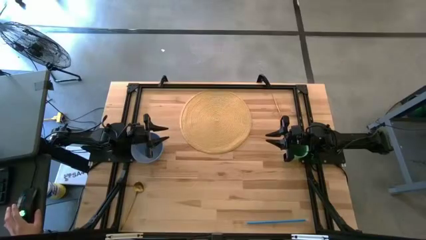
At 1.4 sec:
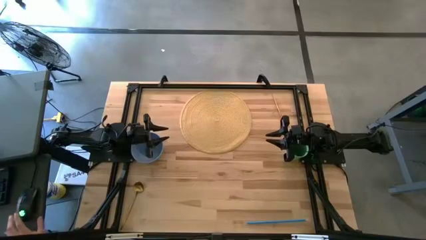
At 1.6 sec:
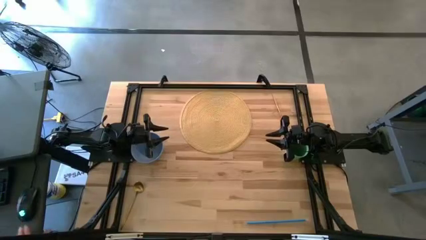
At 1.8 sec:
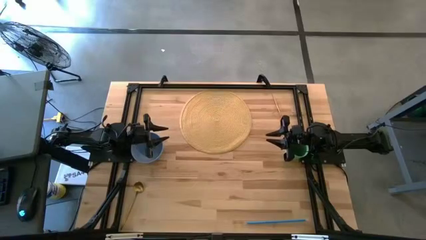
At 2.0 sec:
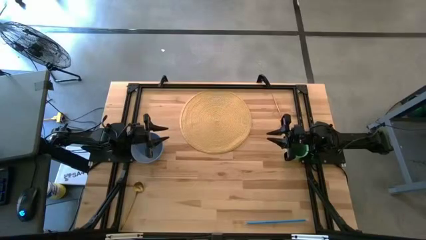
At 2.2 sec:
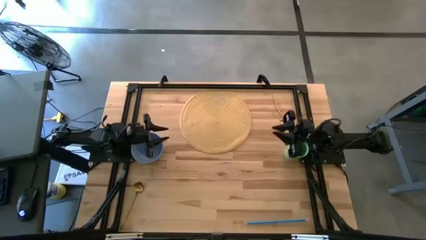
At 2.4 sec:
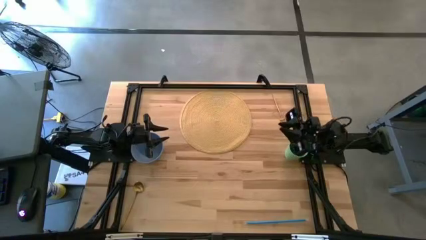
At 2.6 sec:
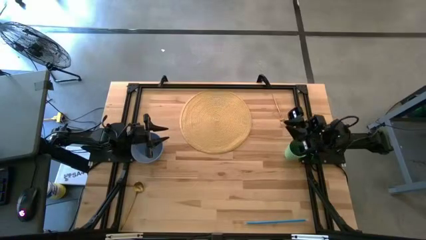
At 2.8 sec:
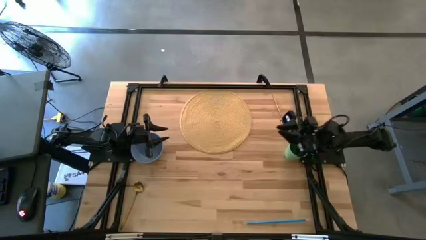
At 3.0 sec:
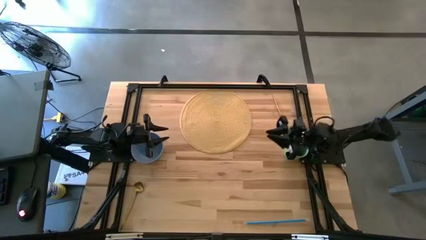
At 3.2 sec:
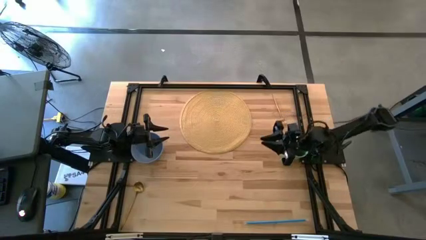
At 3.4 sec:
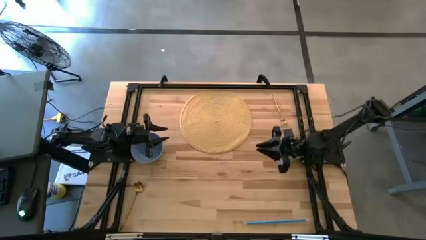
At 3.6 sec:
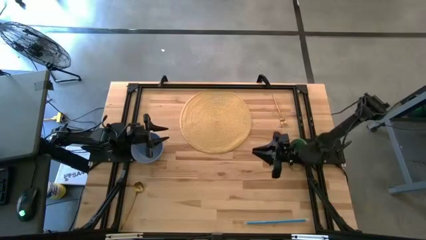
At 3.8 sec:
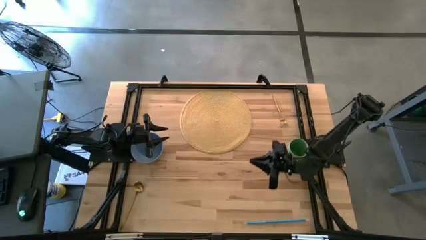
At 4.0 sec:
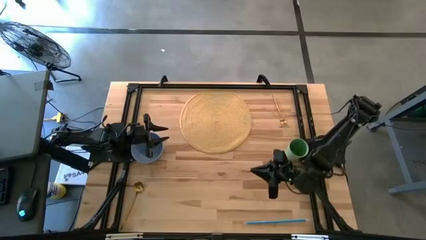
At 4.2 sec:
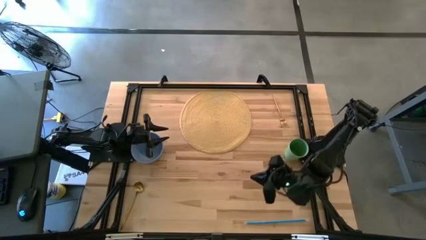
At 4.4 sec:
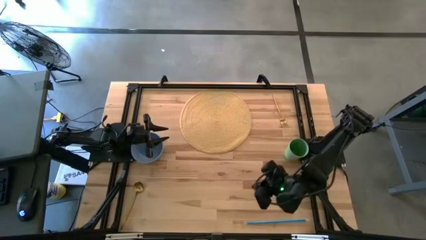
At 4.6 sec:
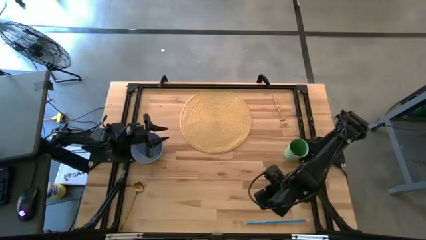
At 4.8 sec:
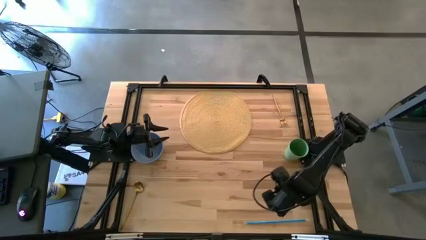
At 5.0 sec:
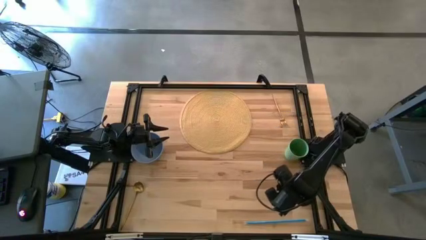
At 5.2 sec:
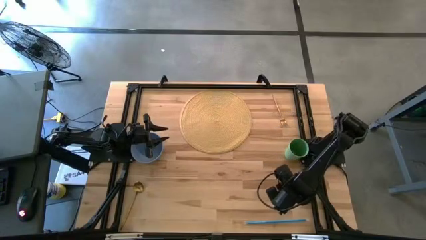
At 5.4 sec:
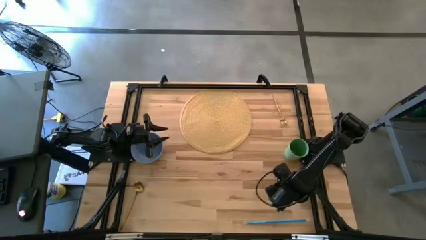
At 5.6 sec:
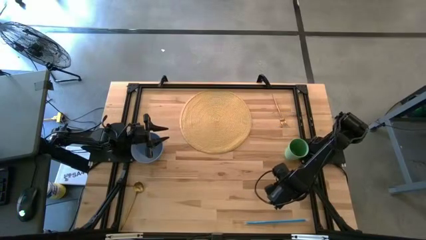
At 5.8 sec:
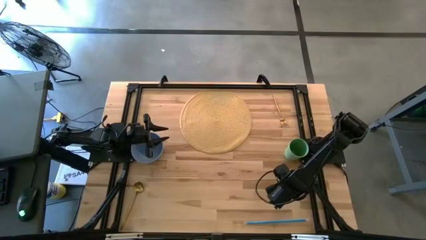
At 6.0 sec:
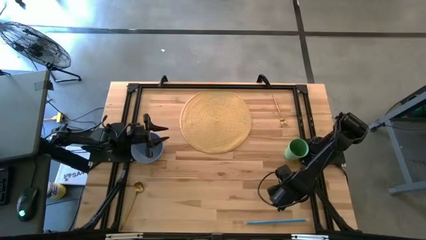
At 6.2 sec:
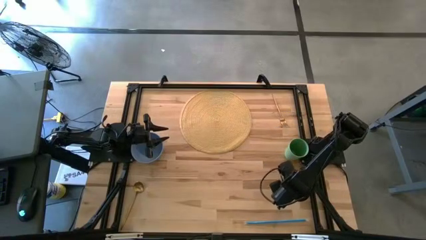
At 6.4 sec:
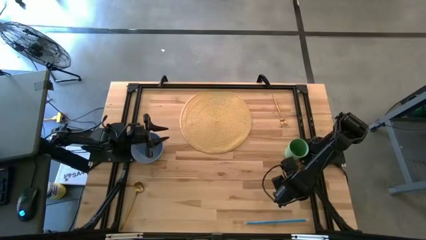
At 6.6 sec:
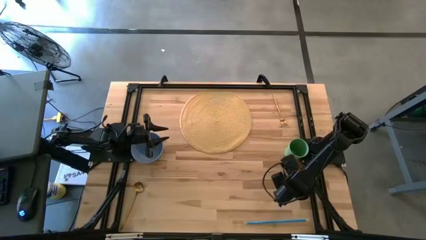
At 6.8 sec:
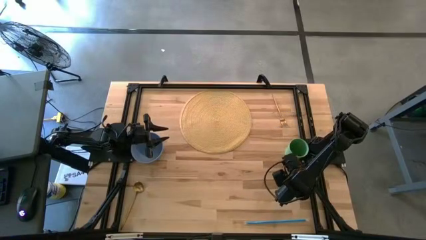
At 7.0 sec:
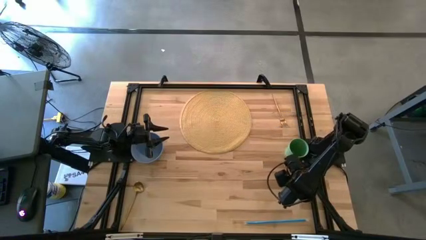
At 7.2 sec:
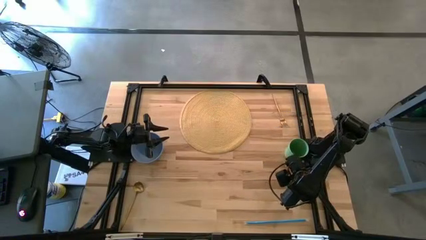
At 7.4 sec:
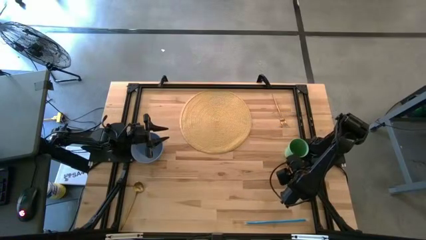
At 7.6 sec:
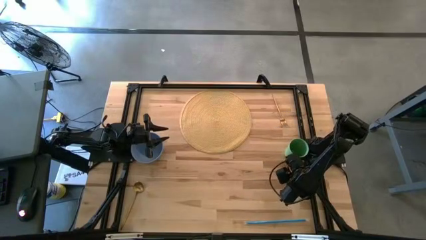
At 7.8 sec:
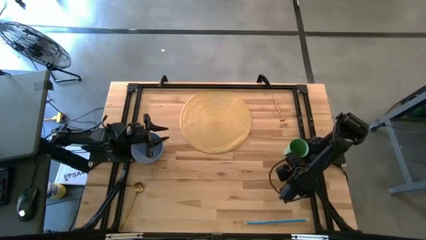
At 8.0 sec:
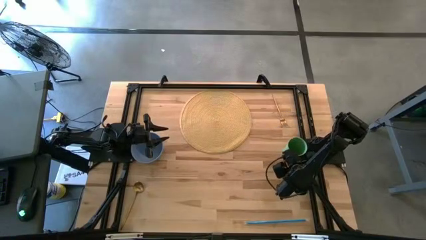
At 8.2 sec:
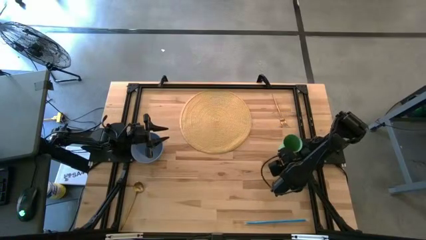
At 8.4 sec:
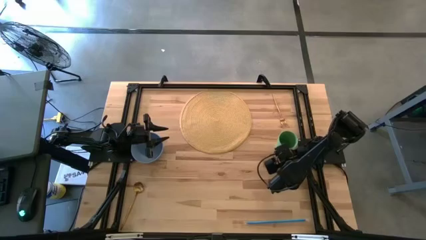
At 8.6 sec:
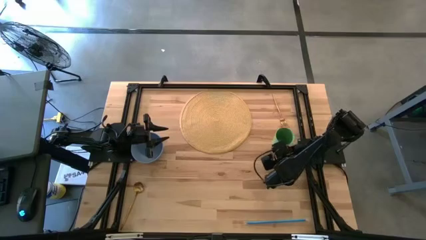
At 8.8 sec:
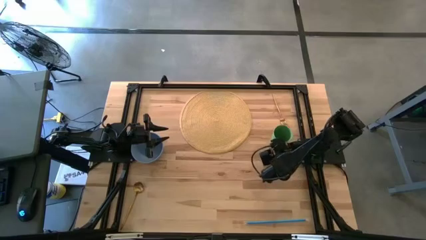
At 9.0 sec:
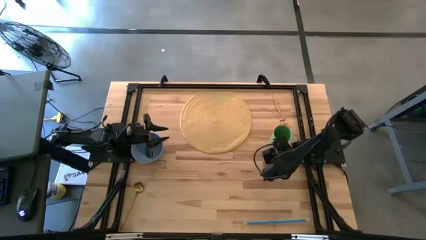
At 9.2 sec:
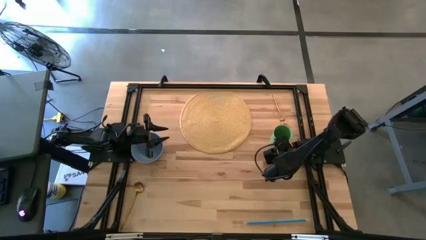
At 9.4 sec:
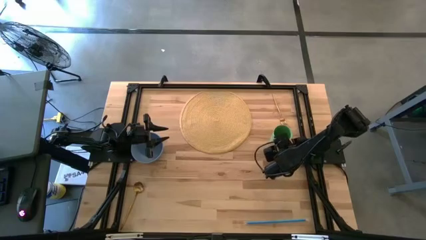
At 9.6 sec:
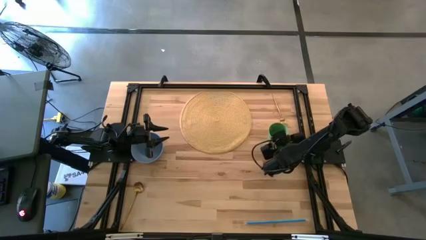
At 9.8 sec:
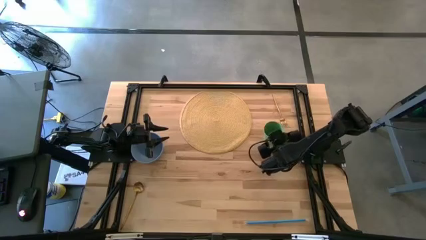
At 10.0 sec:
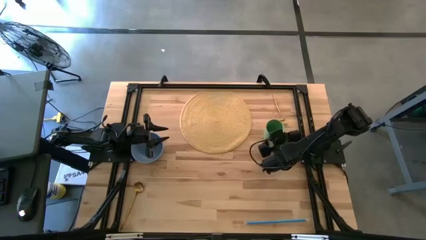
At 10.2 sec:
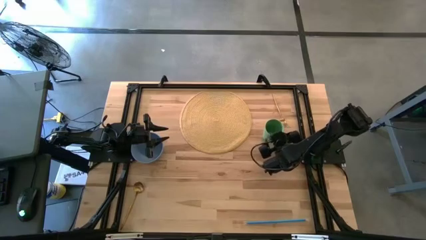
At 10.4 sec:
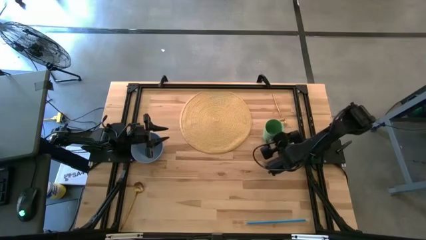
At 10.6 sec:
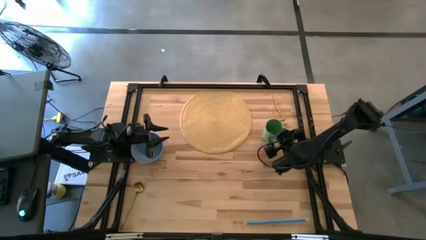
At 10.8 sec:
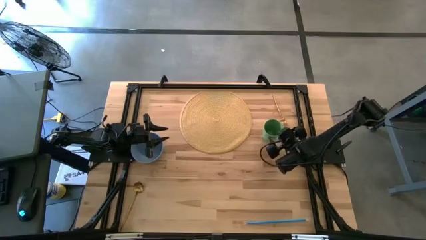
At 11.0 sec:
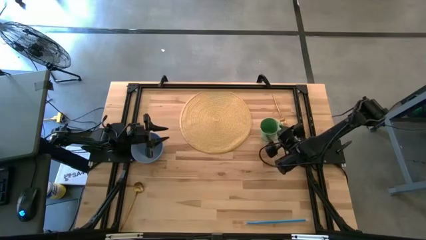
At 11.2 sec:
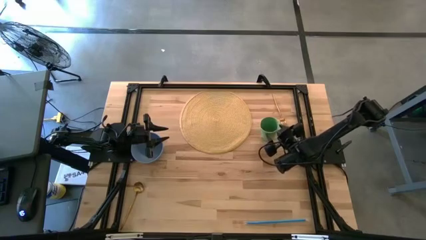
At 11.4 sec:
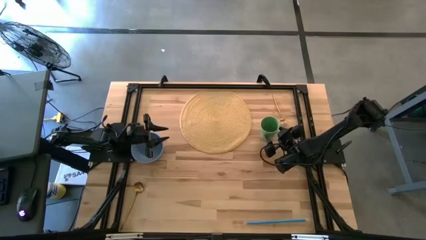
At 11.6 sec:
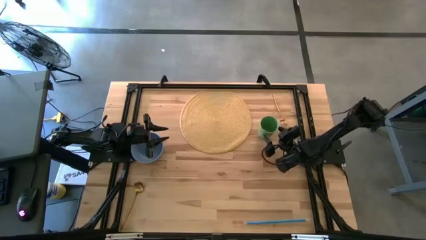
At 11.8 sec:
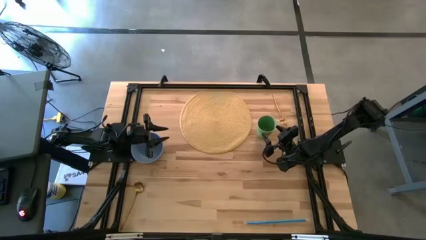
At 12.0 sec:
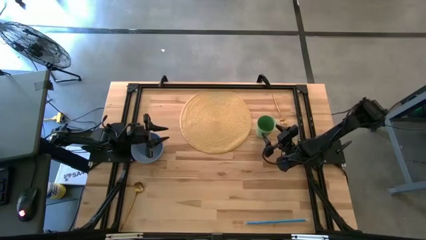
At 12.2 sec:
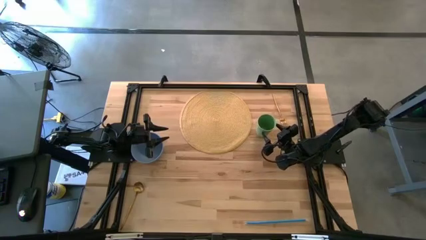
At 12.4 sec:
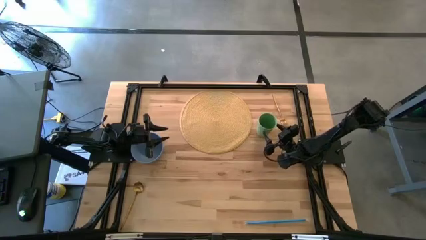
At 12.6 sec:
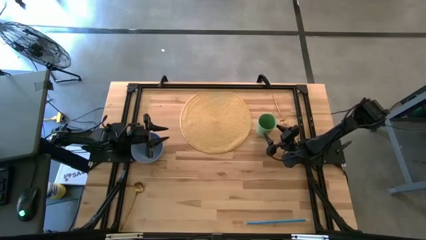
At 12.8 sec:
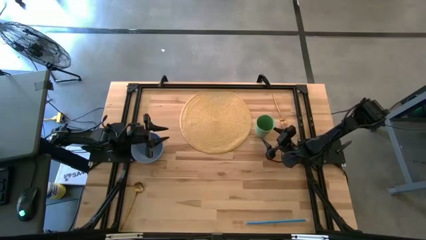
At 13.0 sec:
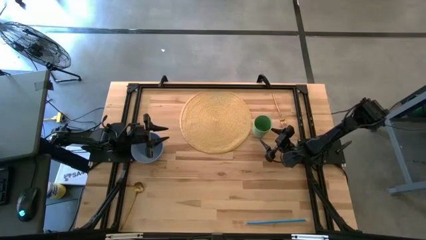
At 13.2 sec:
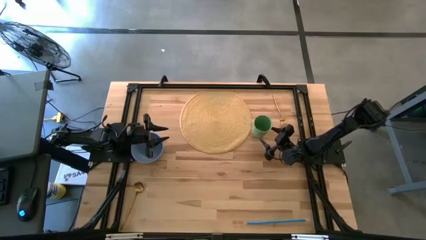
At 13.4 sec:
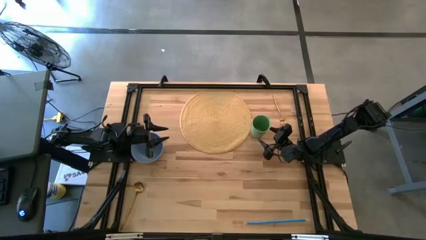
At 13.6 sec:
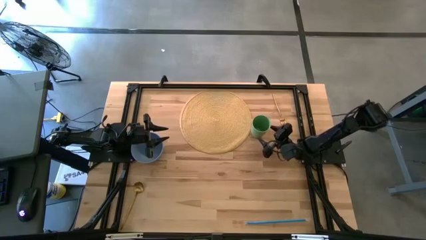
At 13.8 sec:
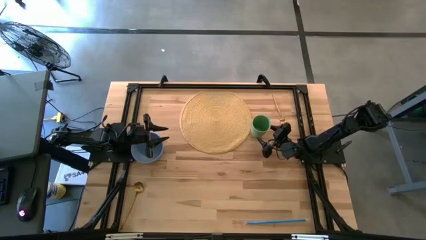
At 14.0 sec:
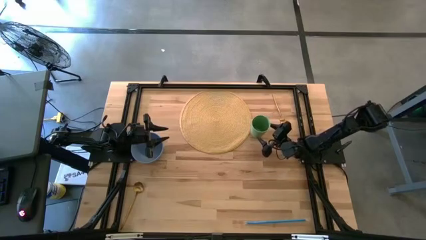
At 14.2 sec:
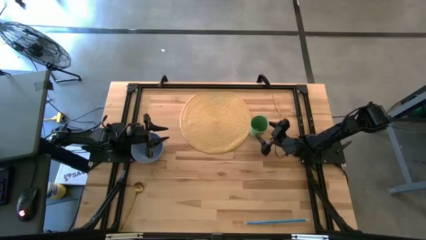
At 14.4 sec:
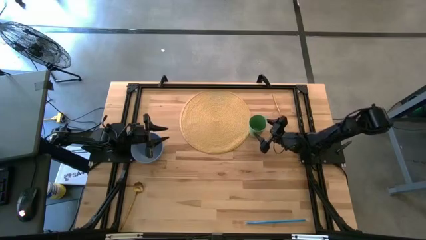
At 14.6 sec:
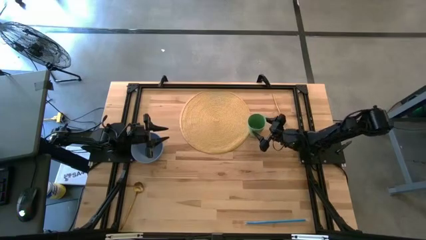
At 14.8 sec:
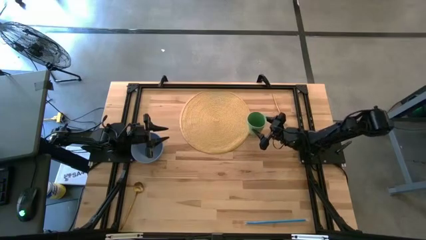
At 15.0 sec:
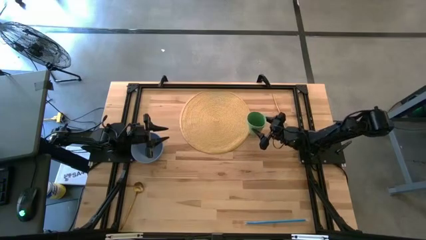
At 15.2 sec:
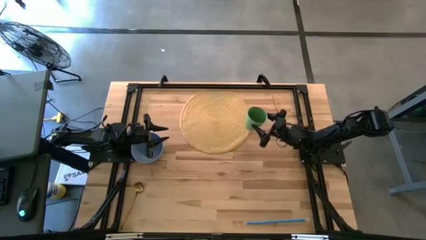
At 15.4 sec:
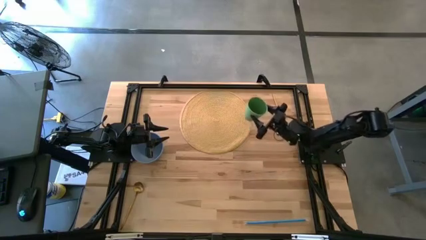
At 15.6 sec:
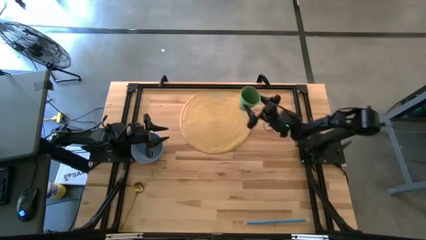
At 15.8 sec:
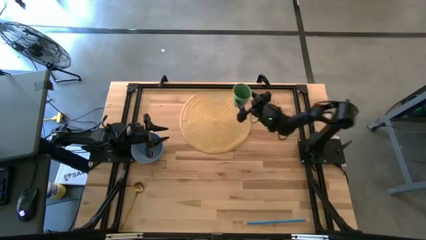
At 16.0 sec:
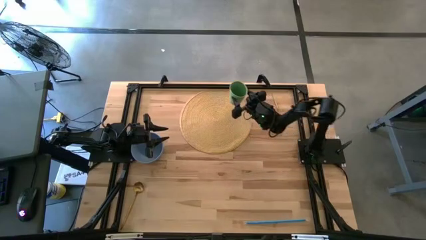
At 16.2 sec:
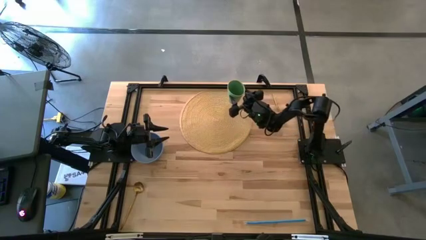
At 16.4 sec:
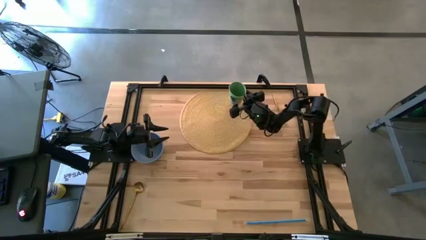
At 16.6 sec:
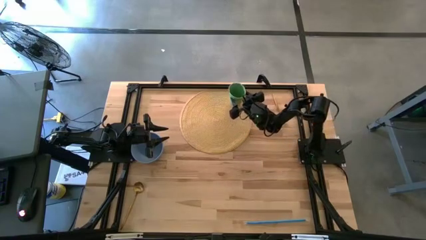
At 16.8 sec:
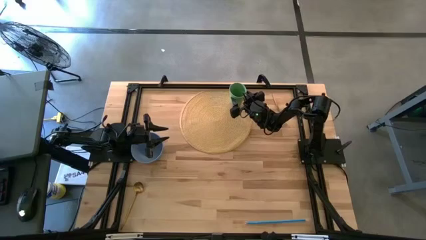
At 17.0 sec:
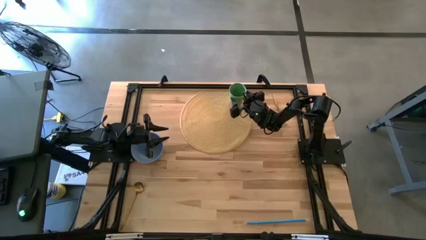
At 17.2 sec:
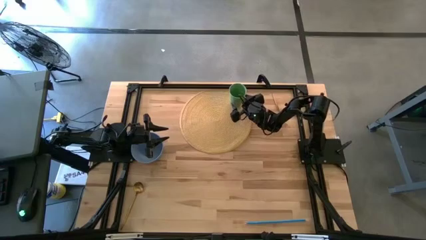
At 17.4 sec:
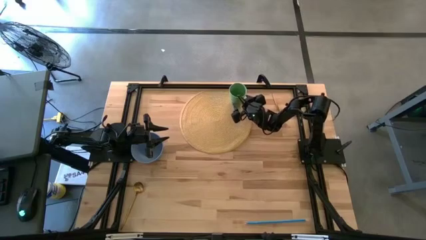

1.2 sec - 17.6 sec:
Task: Pick & Place Utensil
Put the green cup on the top right of the brown mat
